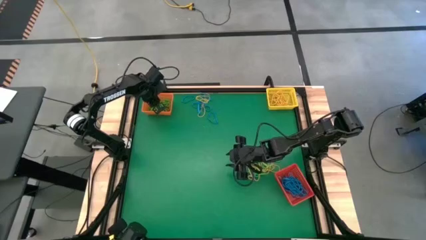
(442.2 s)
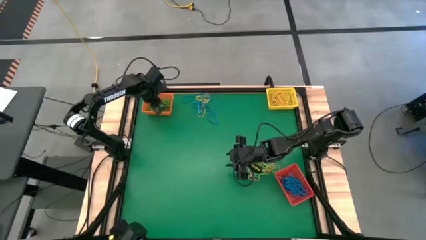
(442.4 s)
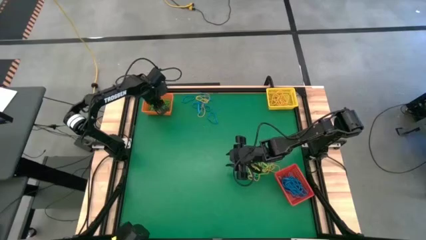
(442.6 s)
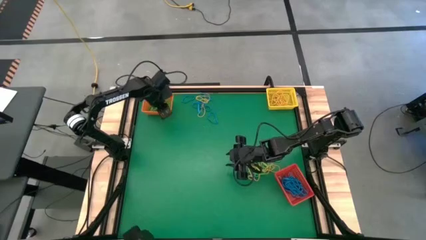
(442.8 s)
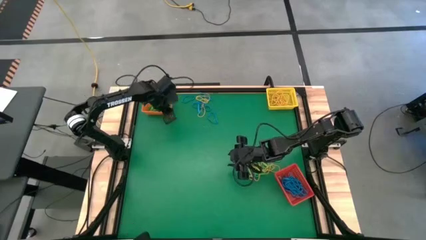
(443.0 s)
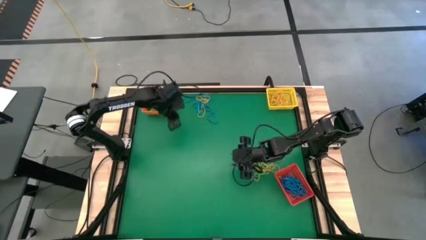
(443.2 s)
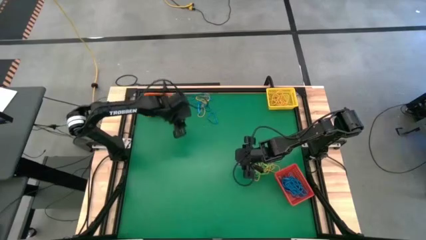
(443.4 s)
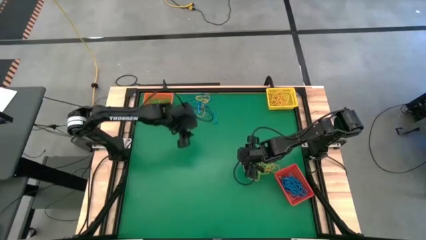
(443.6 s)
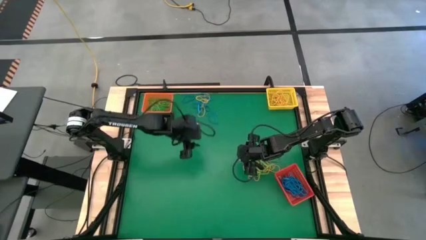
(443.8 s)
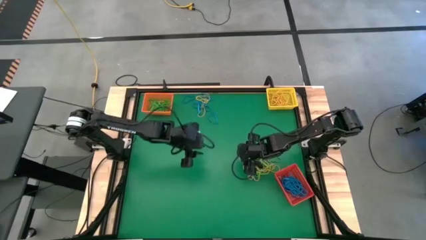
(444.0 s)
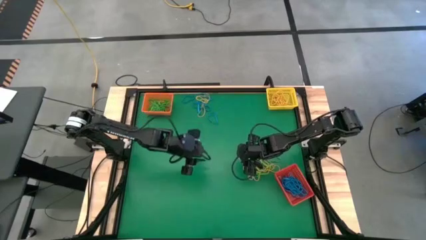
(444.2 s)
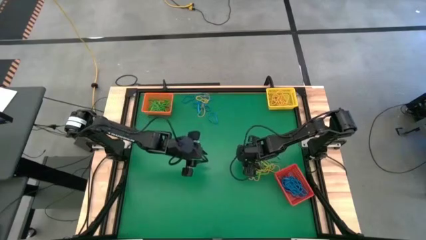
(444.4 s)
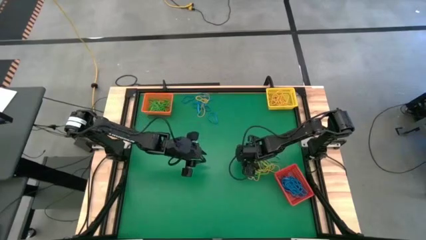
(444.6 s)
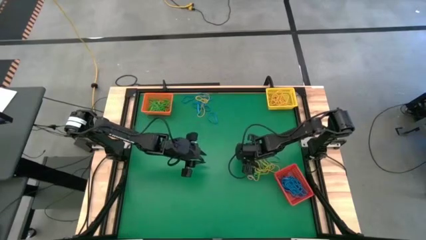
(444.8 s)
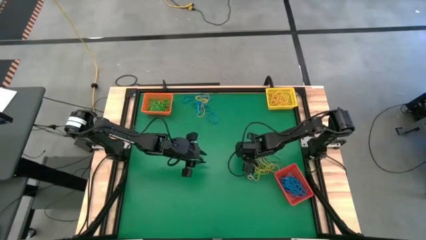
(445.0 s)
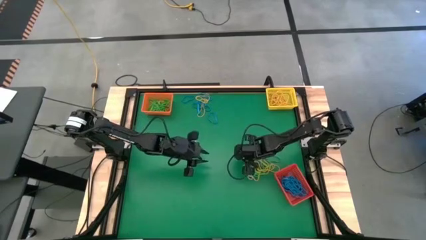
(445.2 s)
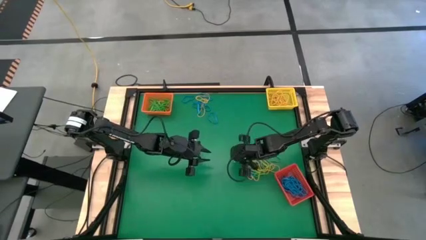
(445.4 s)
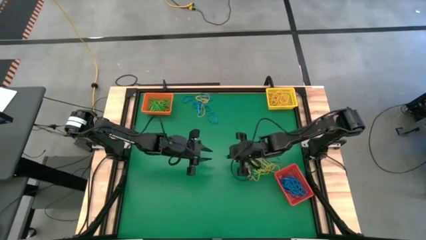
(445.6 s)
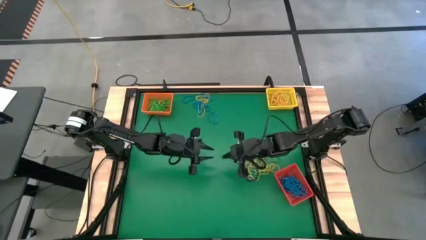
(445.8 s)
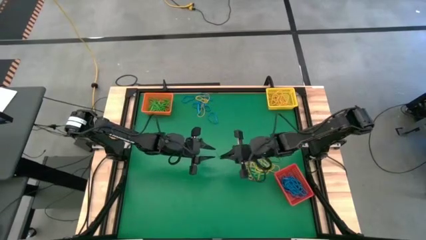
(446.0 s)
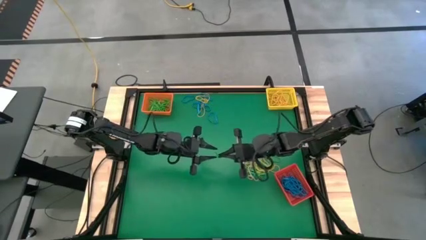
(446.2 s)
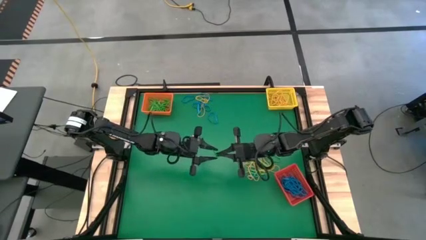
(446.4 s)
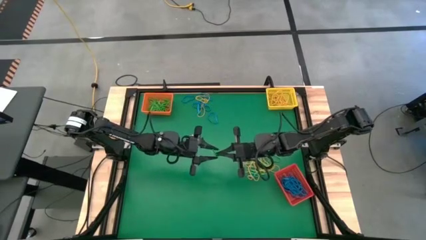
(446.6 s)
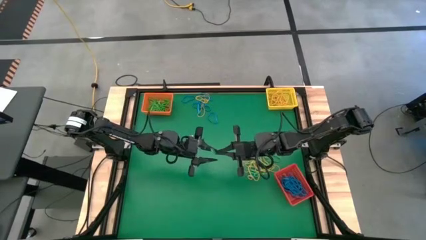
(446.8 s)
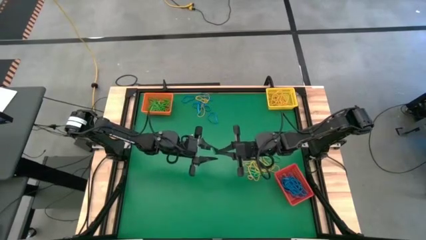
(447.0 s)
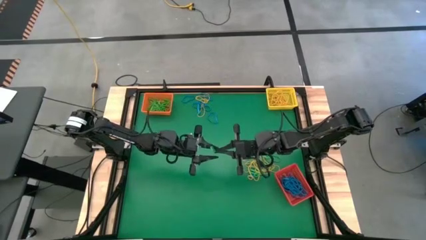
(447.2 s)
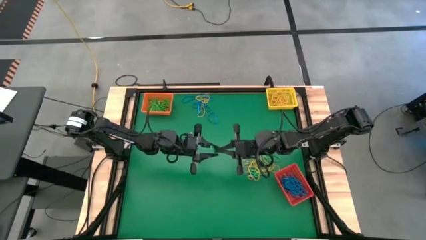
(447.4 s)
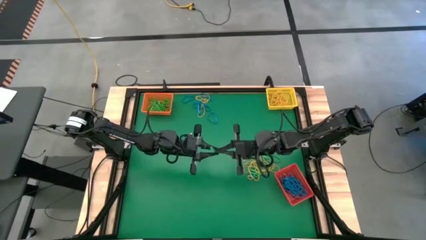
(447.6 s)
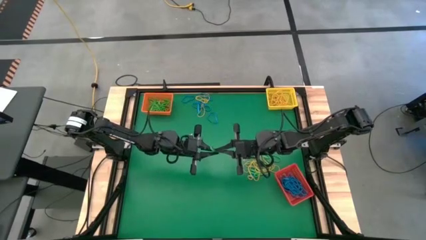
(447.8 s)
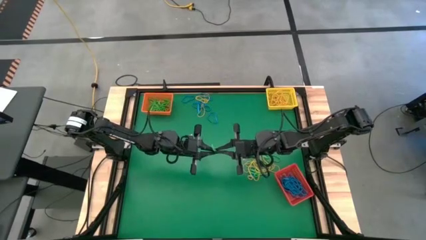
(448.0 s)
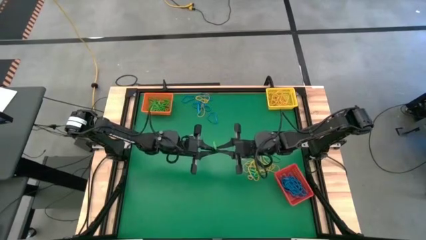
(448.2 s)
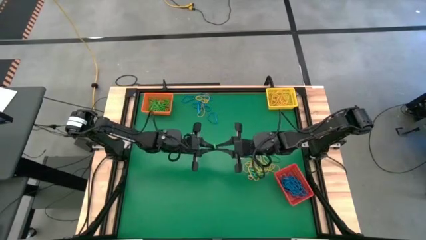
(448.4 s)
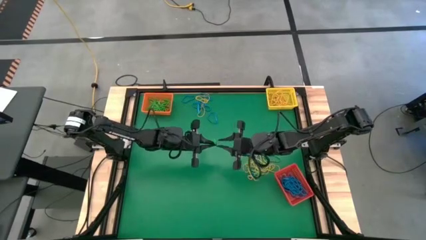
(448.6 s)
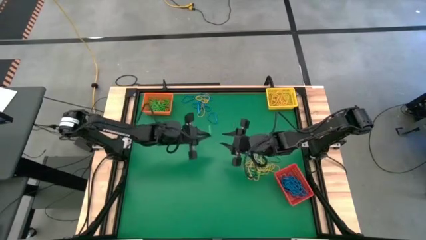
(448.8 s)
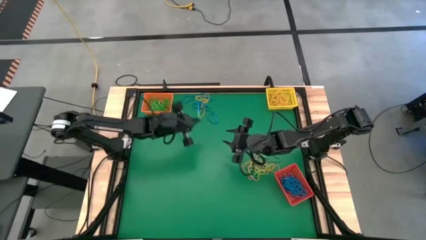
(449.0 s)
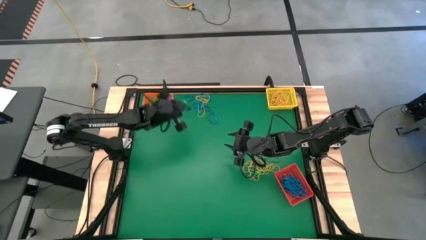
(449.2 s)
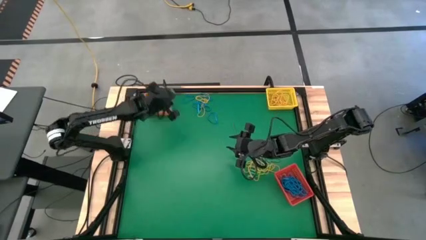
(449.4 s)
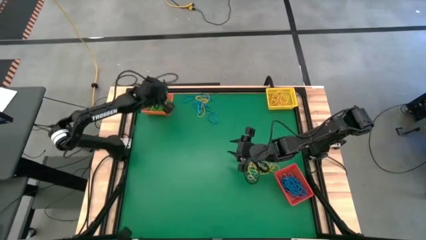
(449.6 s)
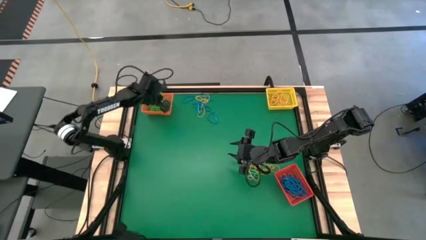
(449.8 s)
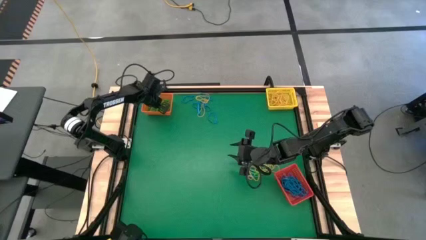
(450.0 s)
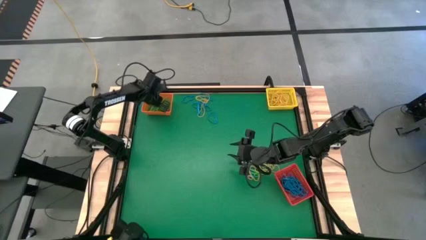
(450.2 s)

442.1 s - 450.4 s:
Task: Sort rubber bands into baskets
Put the green rubber band into the orange bin

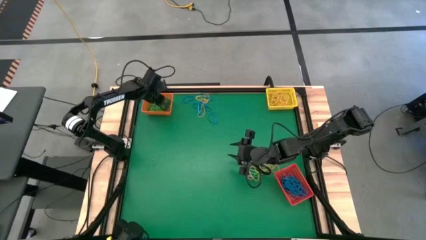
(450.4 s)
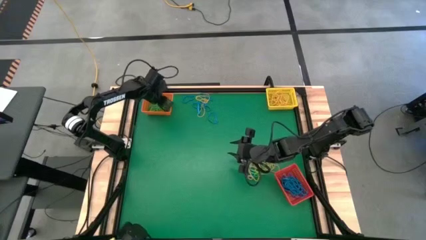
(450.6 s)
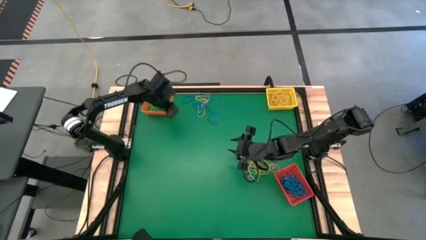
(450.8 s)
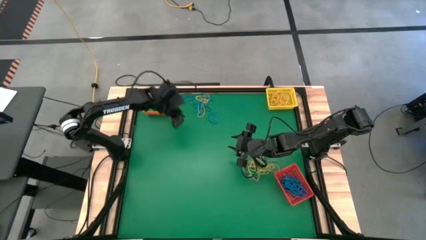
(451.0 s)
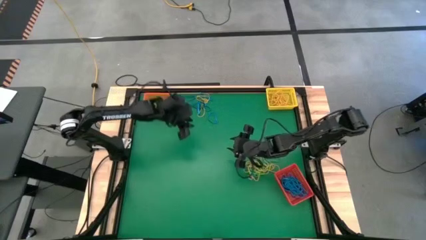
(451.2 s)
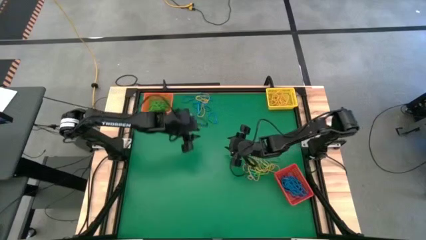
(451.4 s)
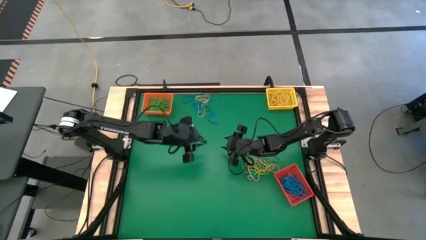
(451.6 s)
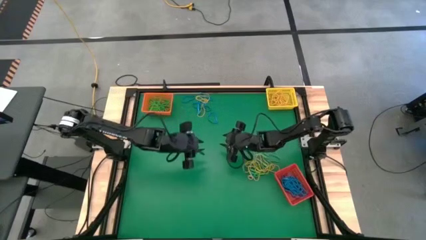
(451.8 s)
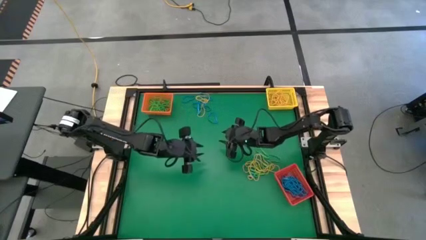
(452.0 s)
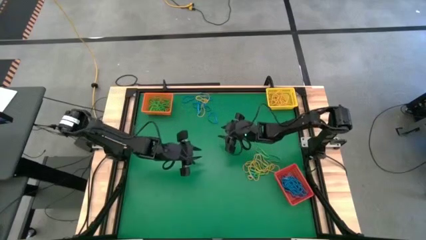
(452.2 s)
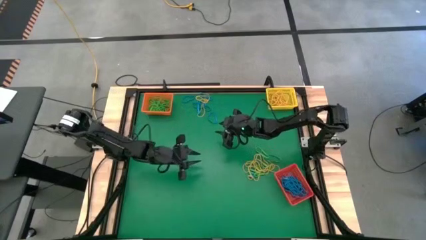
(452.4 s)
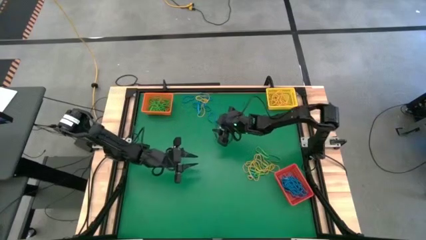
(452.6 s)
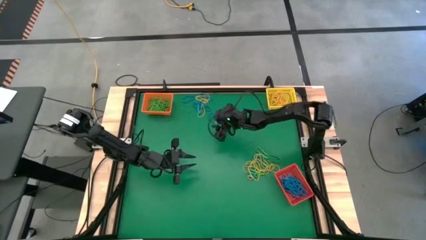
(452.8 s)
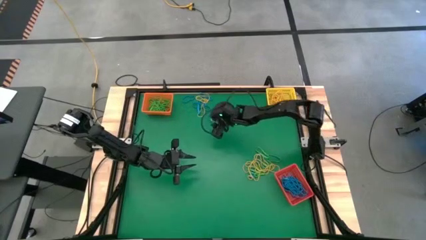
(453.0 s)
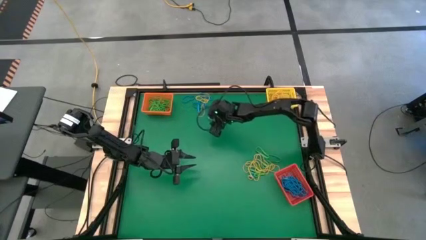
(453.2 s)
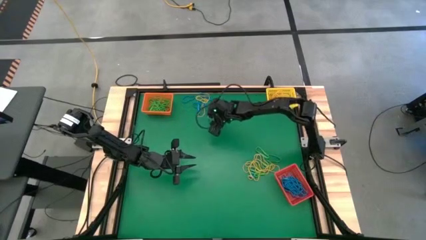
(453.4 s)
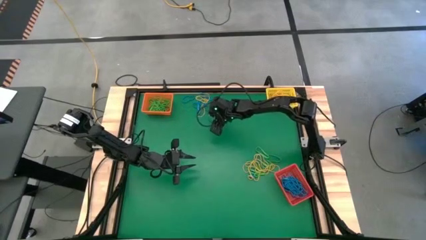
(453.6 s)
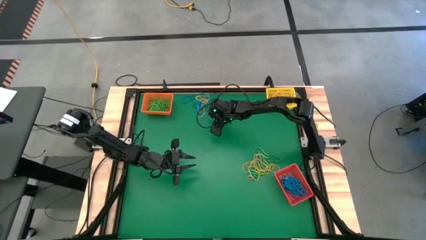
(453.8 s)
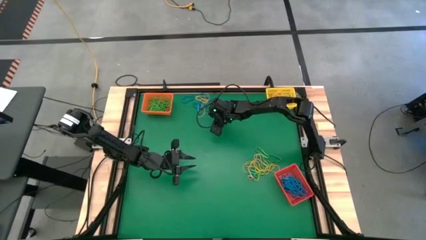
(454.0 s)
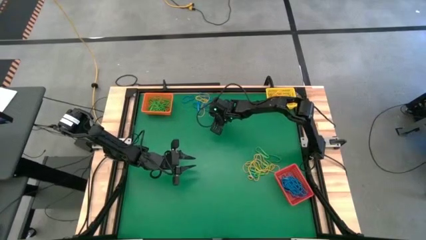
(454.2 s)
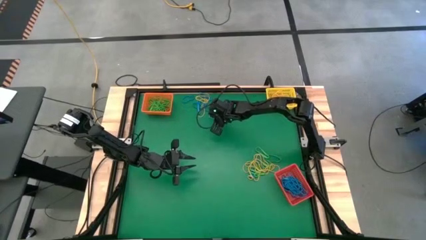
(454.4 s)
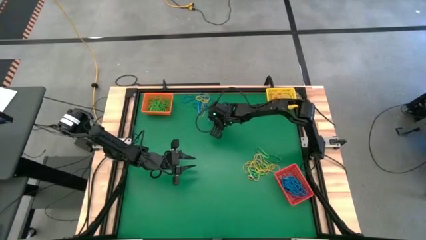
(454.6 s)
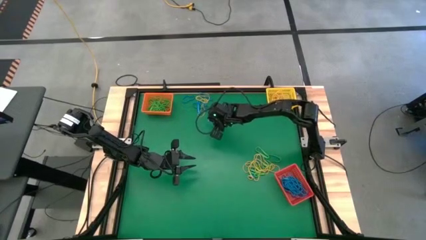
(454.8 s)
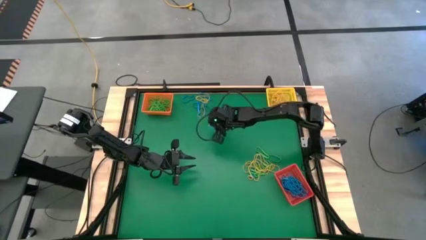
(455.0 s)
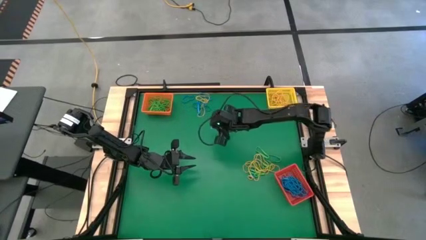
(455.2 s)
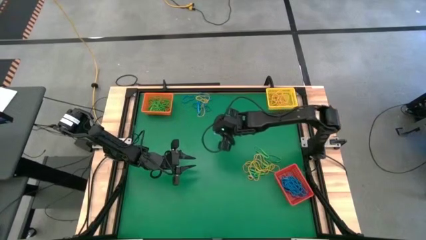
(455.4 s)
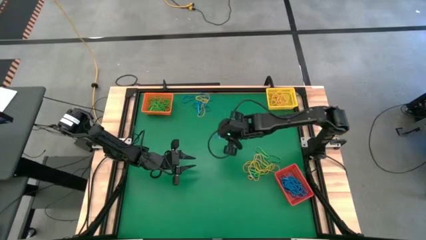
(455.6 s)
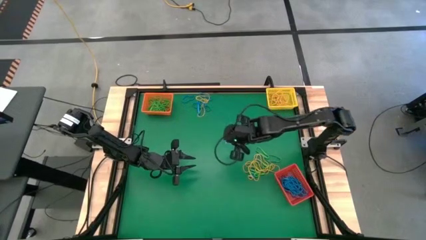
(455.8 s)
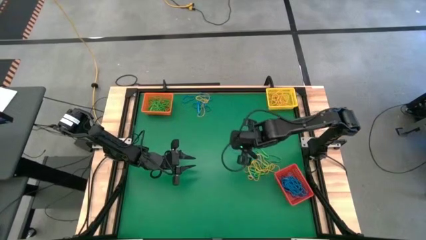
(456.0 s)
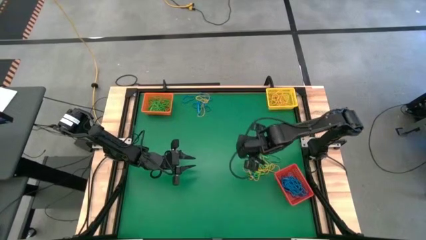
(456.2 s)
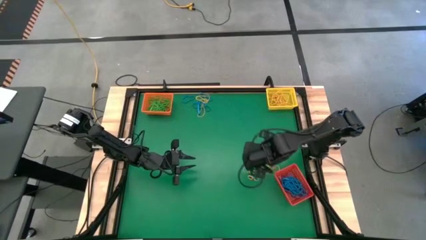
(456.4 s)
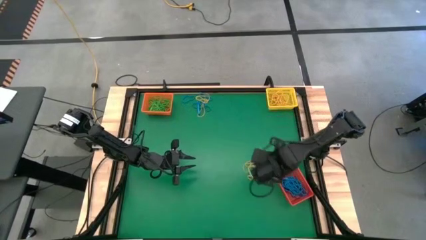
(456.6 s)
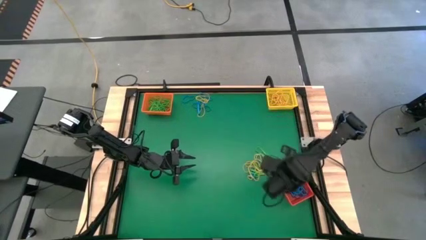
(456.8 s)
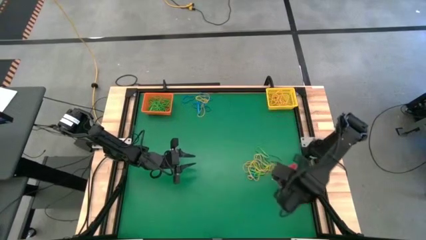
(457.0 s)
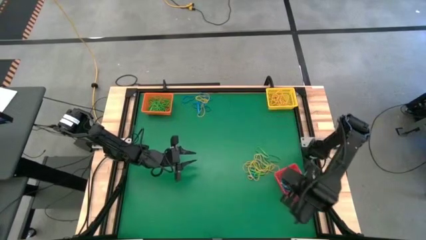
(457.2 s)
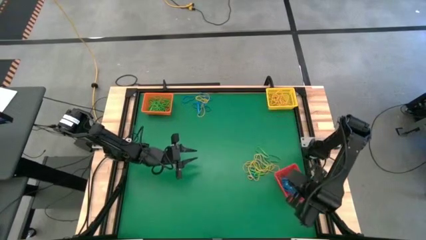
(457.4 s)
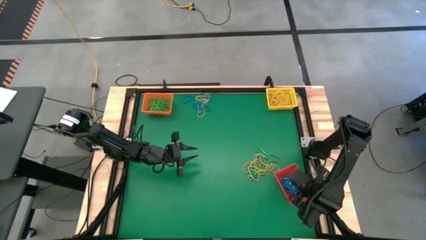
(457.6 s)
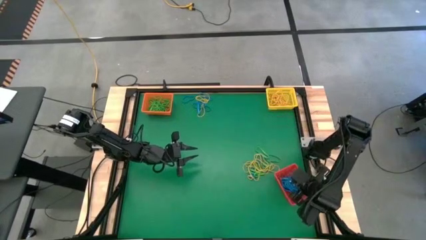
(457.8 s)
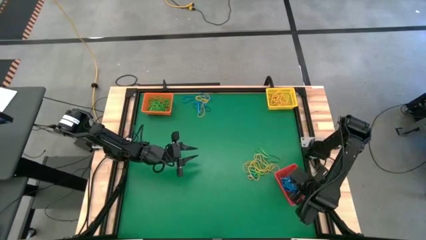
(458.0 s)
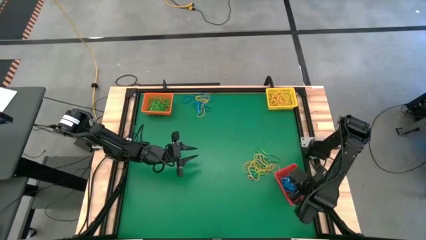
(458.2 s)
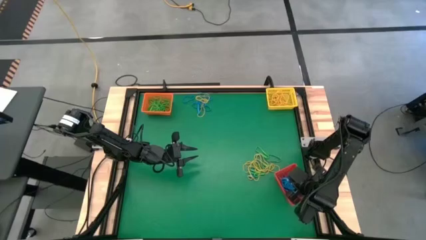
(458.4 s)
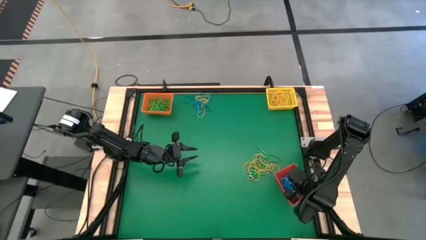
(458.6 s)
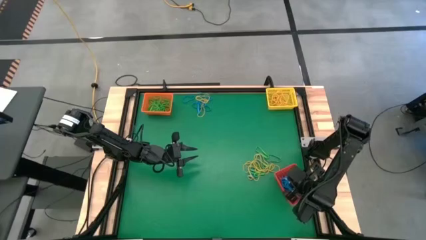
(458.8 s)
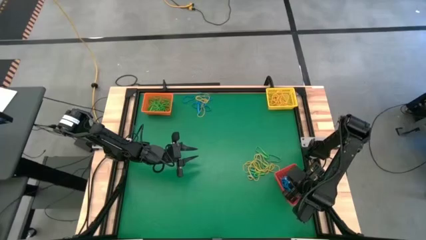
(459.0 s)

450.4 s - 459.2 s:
Put the blue rubber band into the red bin
